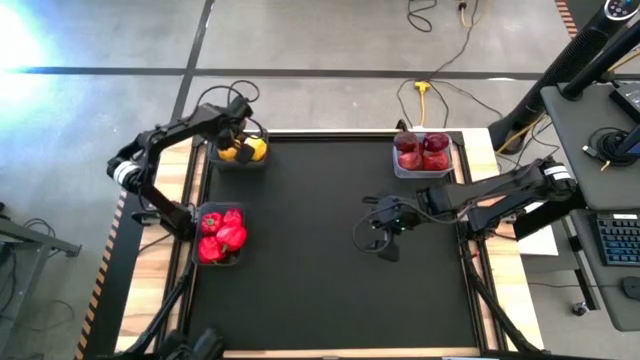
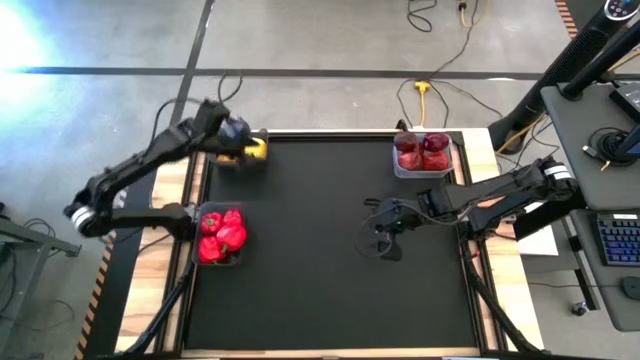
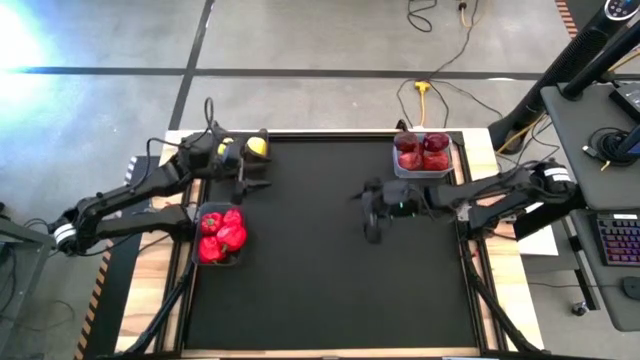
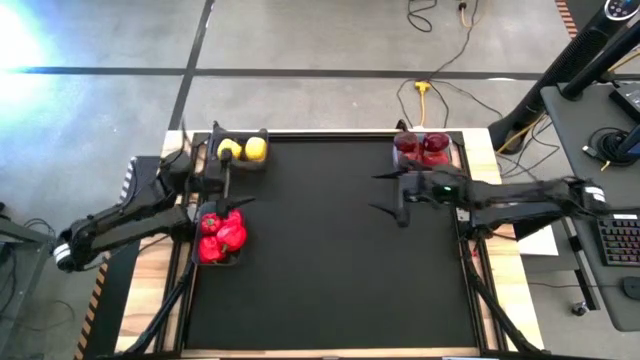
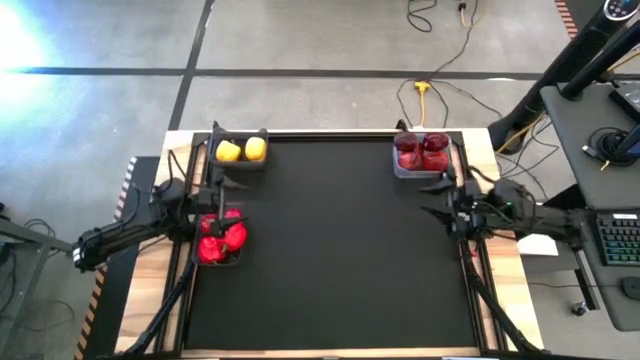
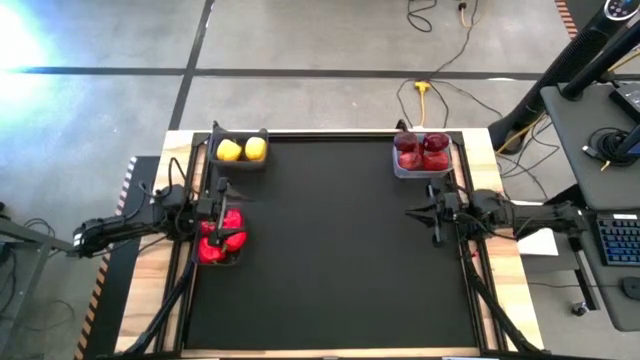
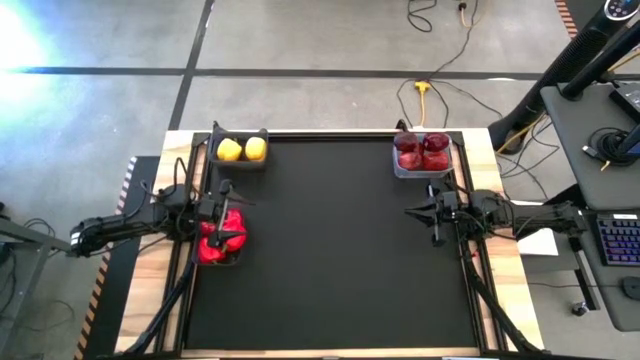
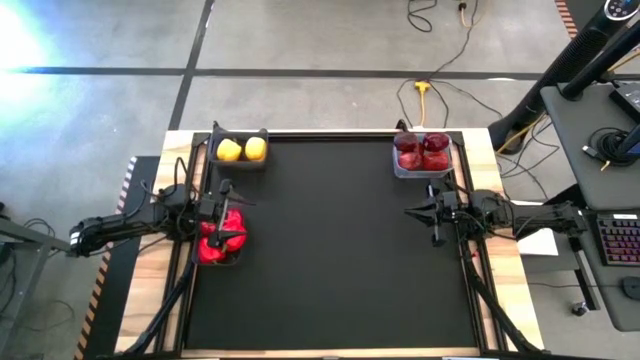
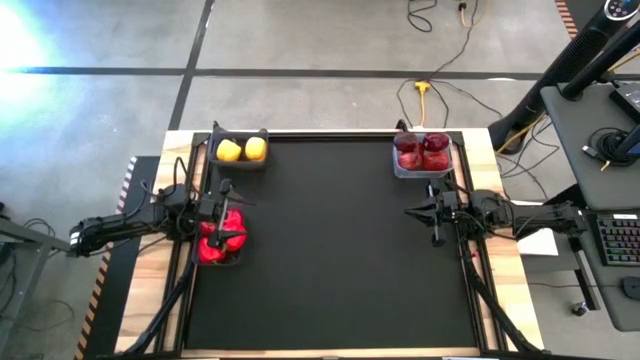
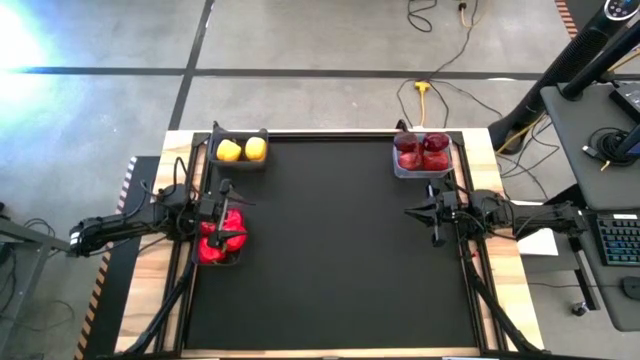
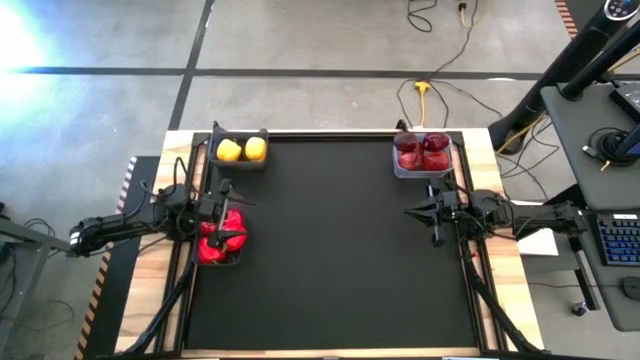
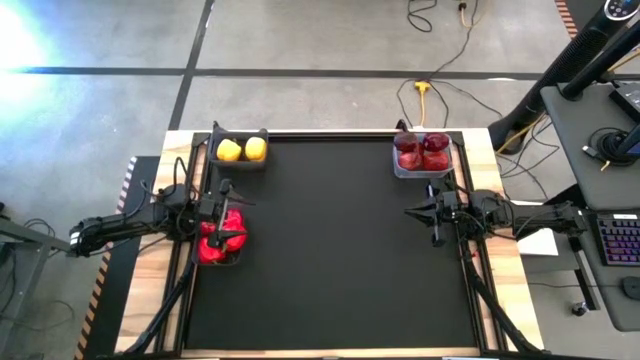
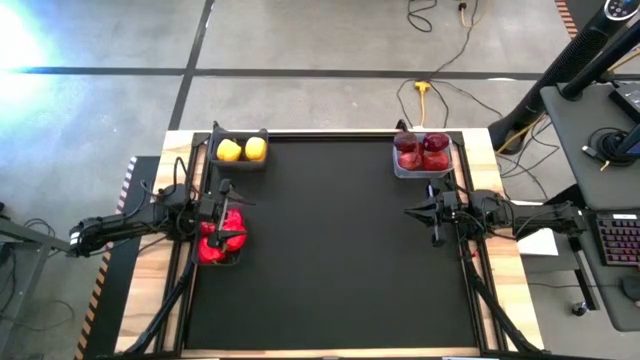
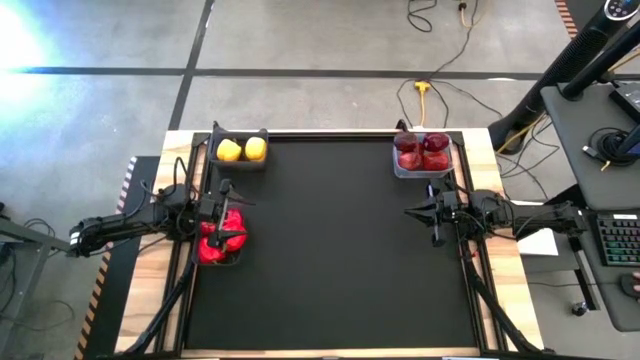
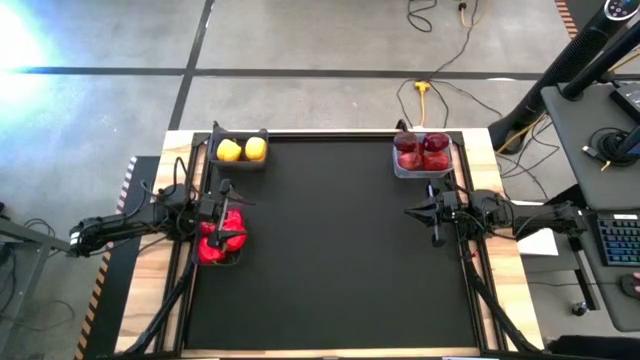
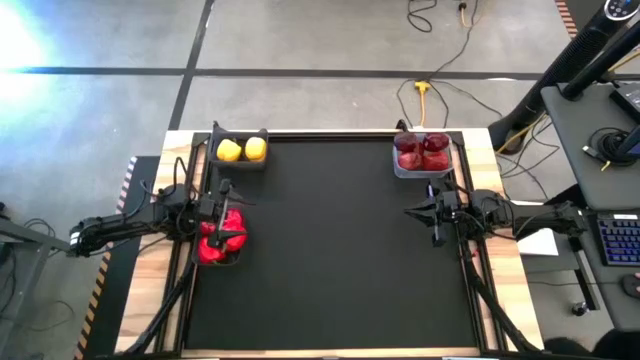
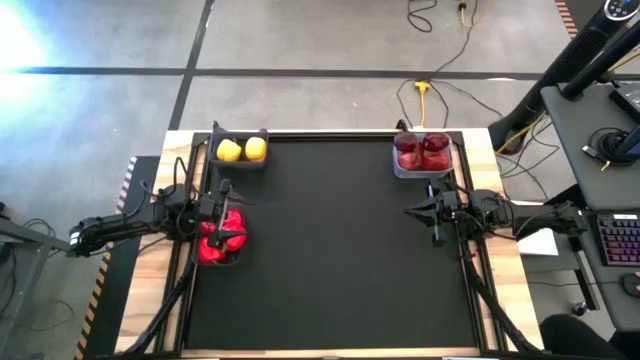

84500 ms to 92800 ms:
Task: Sort produce into baskets
Return to Home Position

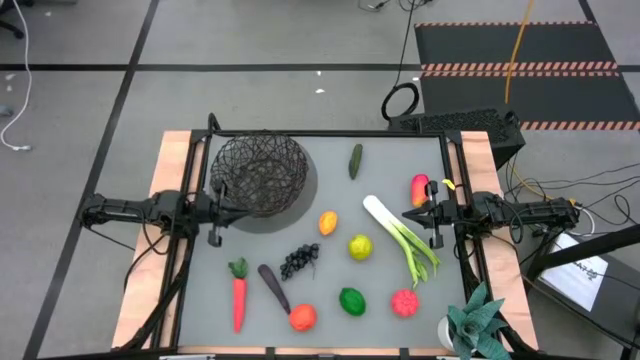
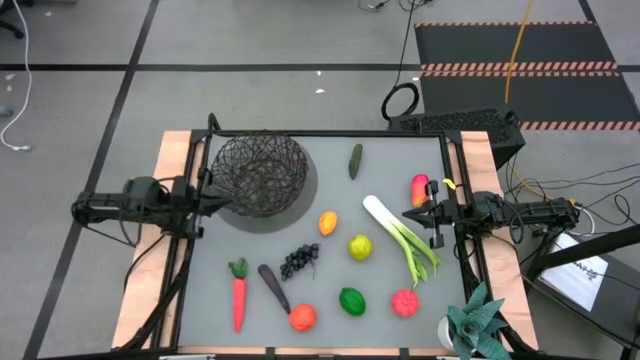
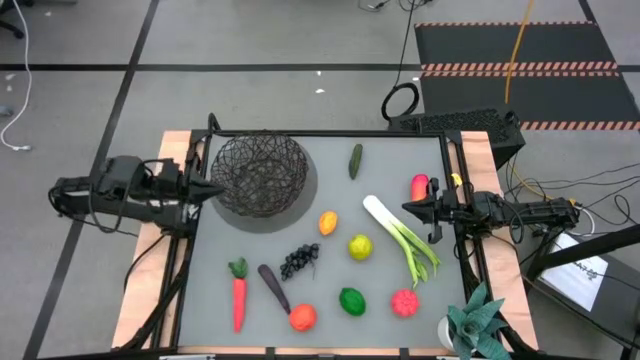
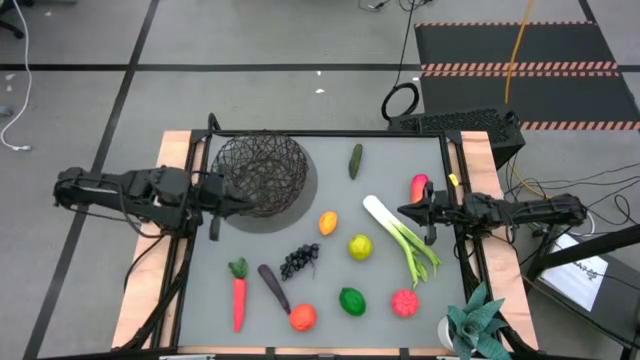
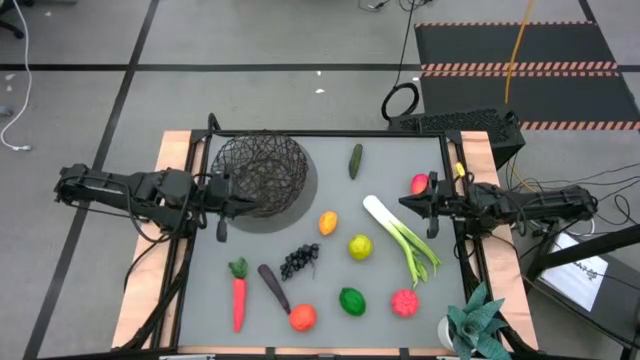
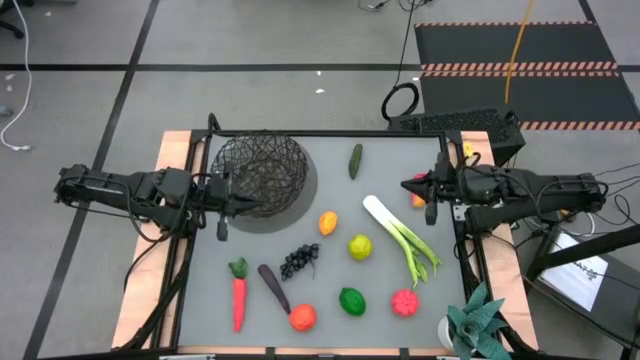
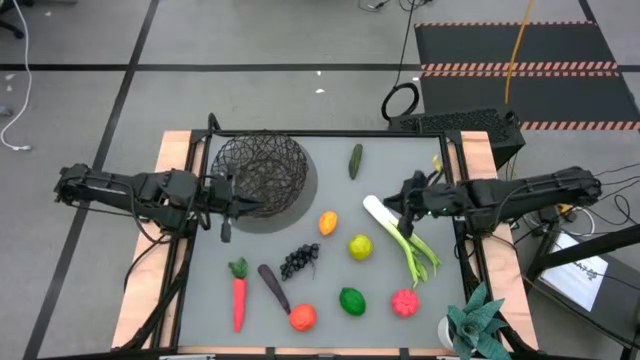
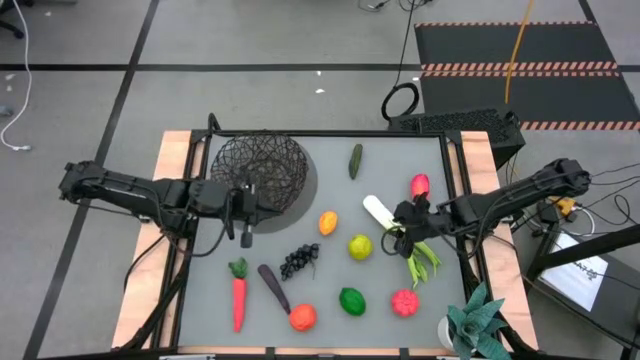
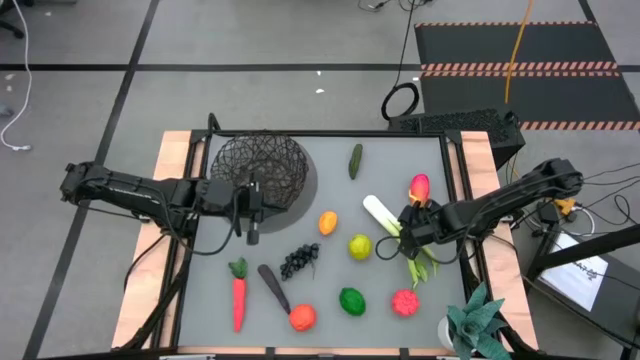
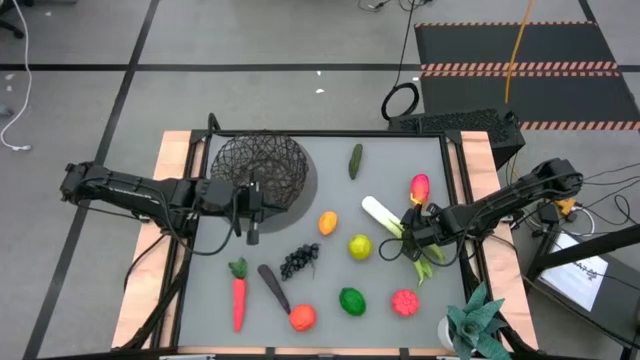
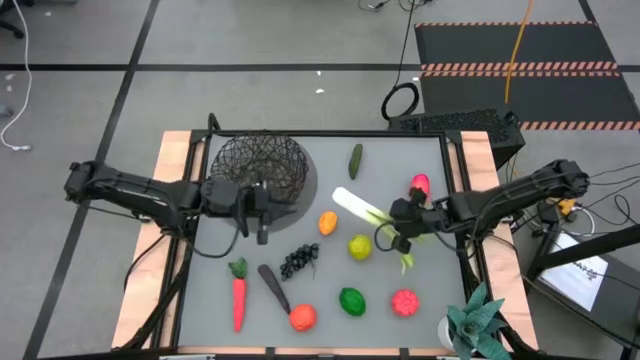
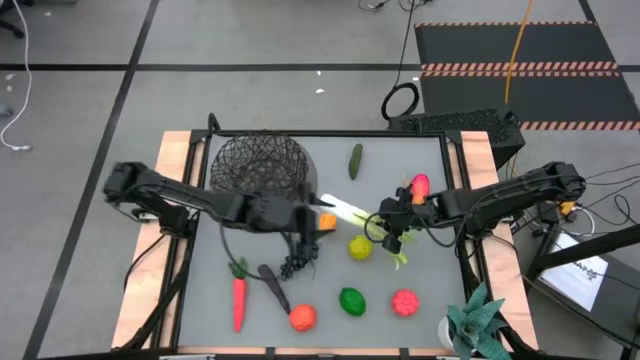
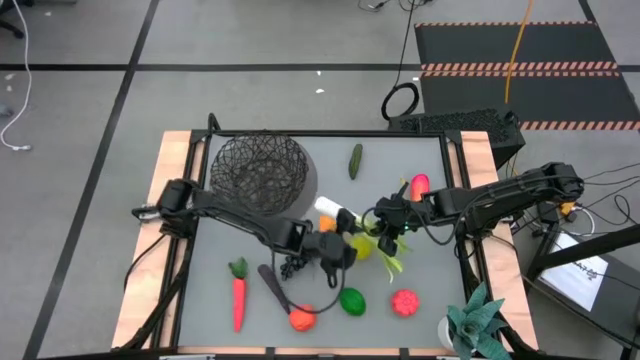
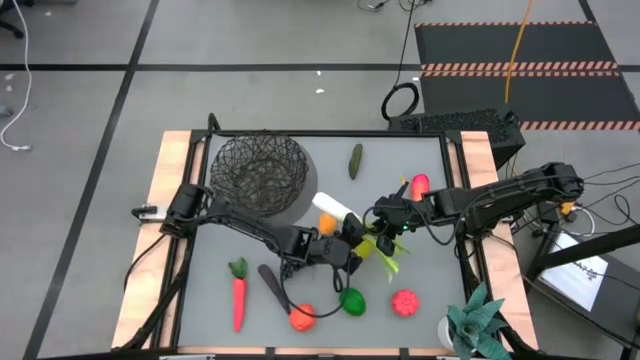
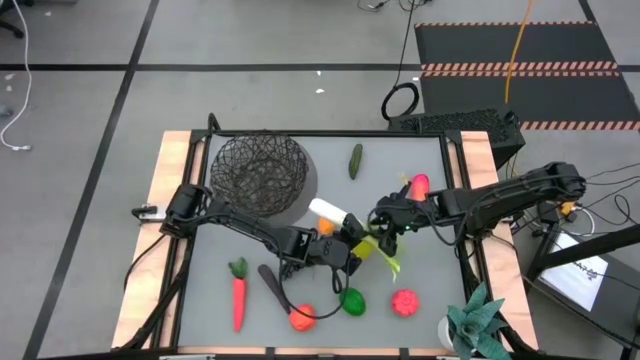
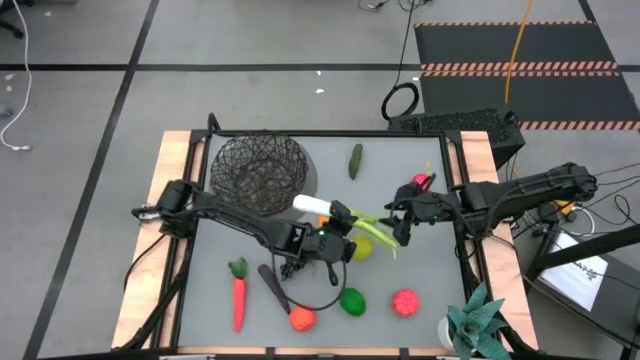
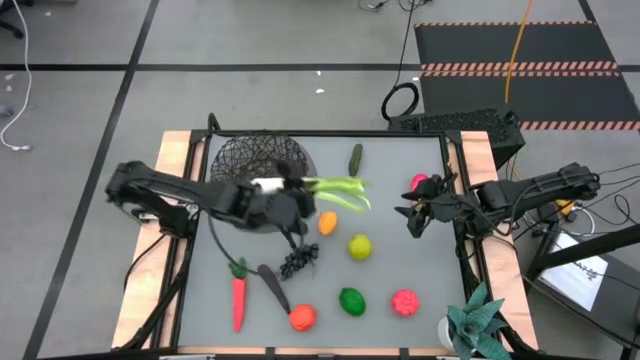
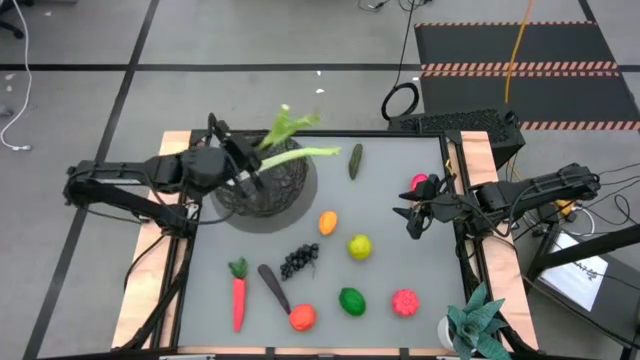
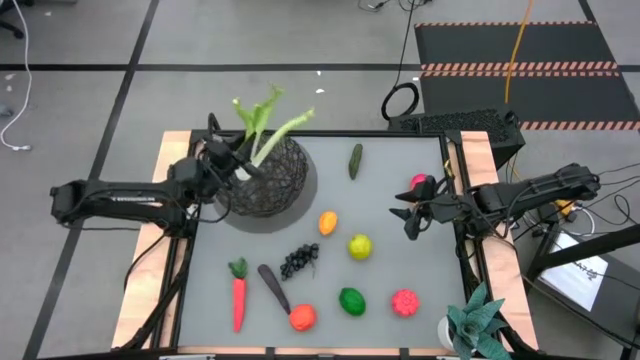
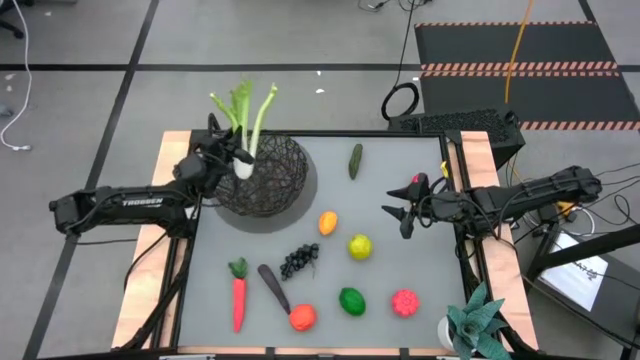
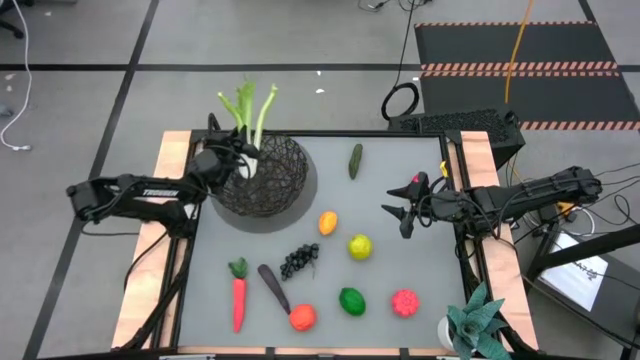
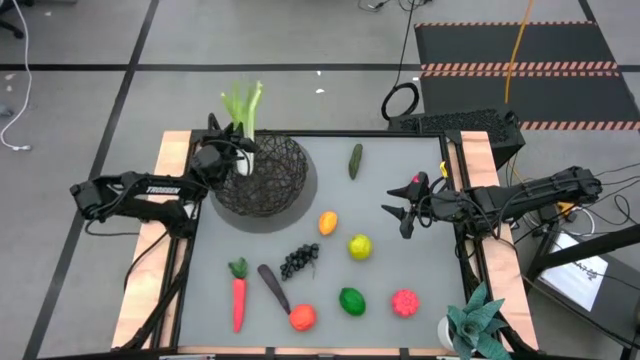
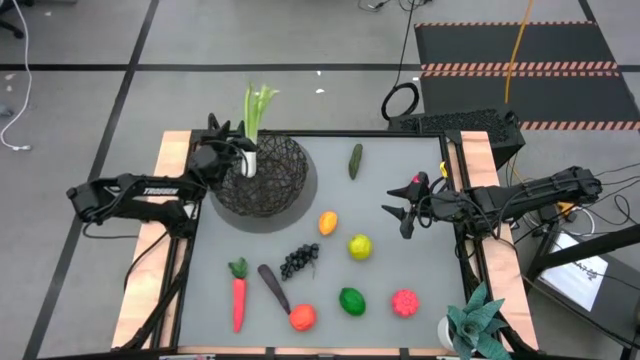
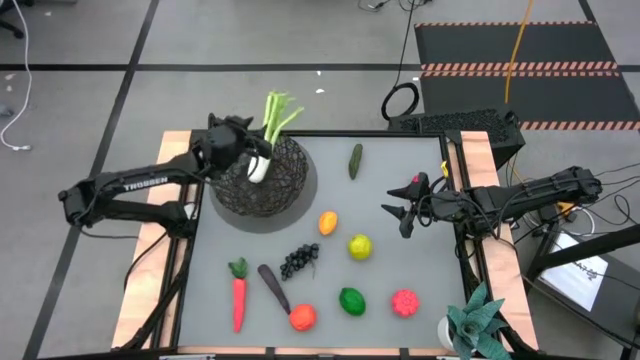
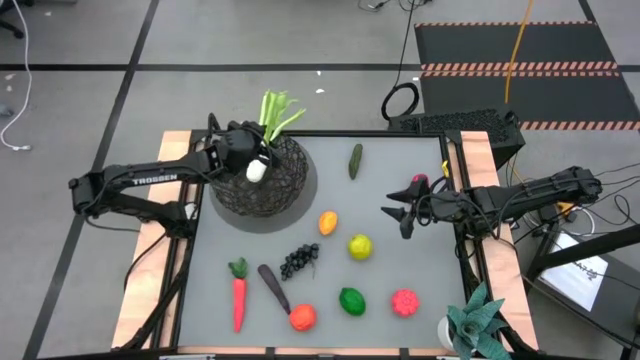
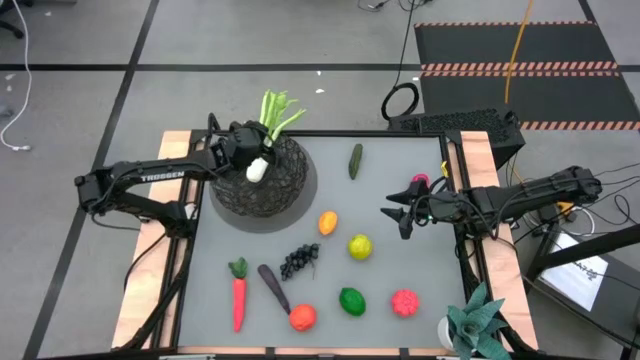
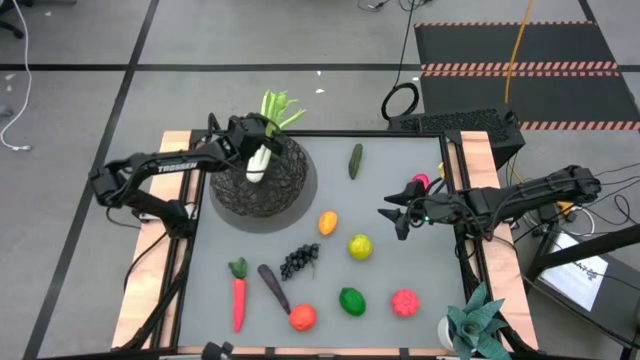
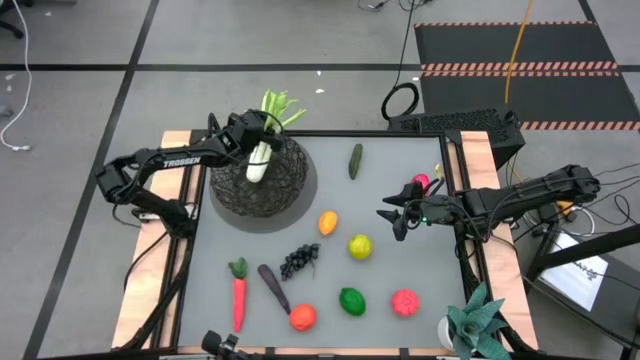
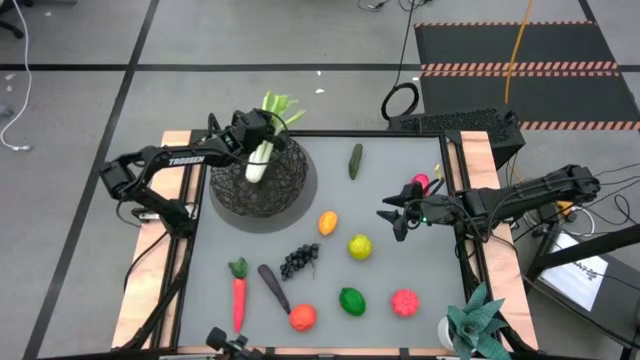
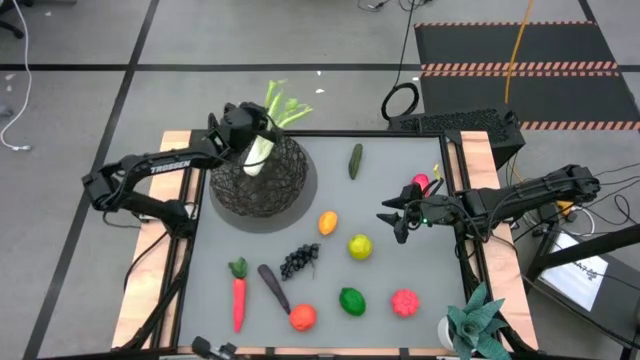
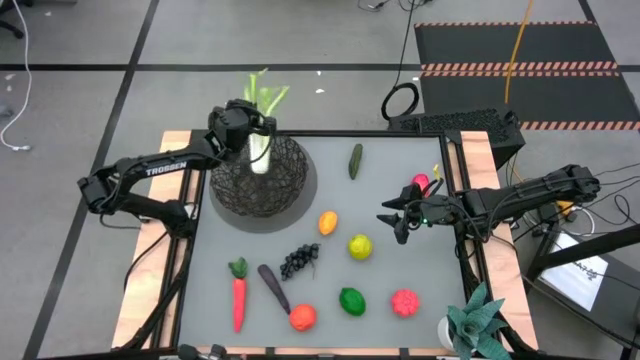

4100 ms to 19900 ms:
Task: Build produce basket
Put the celery into the wire basket
